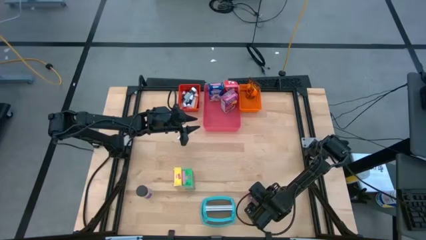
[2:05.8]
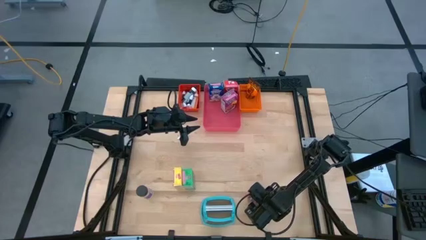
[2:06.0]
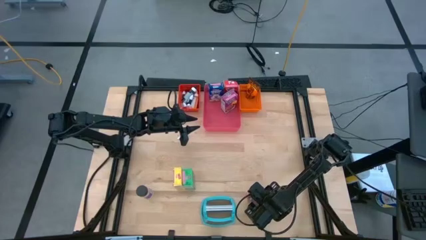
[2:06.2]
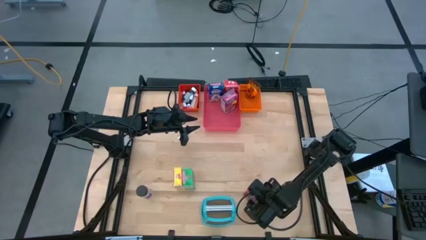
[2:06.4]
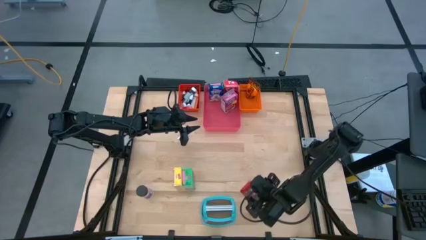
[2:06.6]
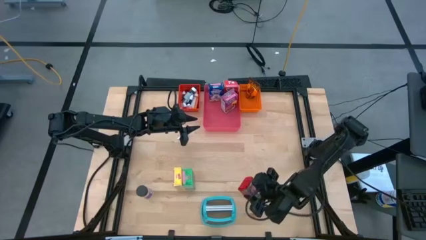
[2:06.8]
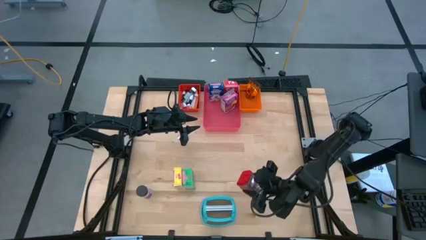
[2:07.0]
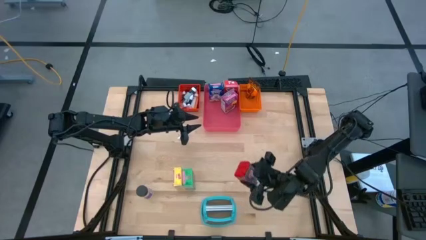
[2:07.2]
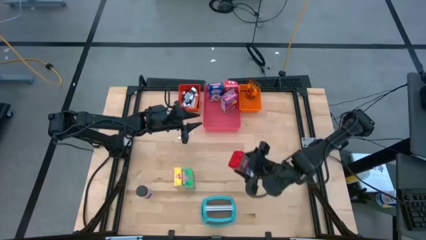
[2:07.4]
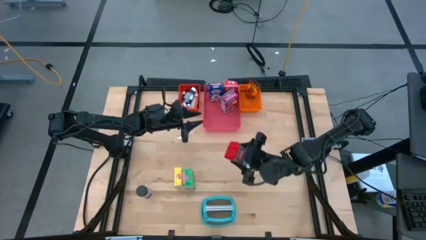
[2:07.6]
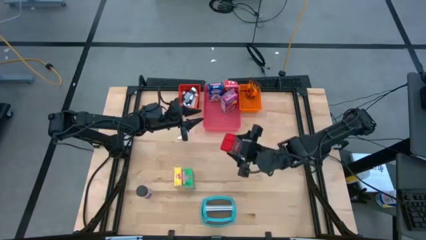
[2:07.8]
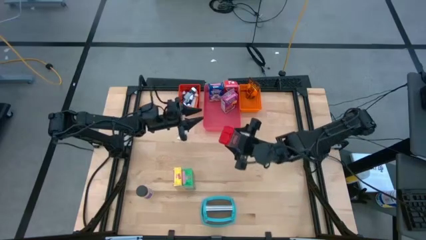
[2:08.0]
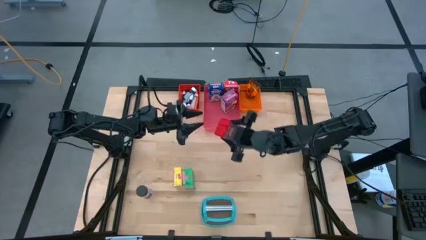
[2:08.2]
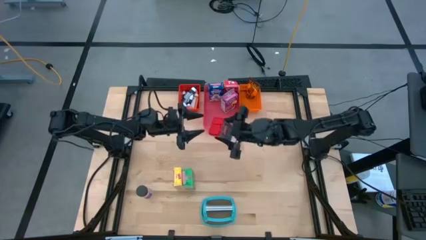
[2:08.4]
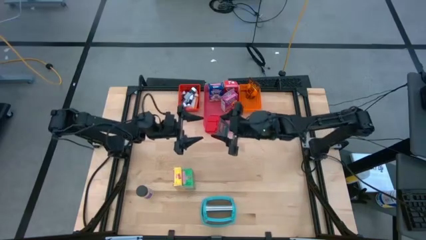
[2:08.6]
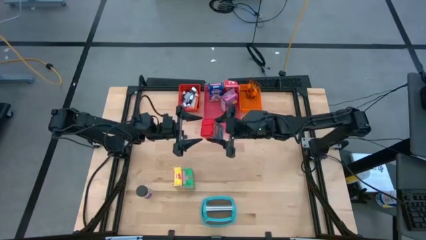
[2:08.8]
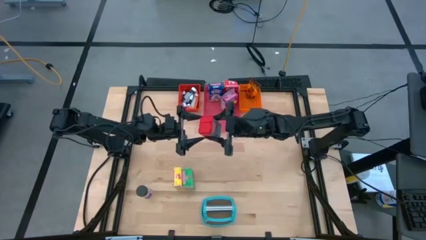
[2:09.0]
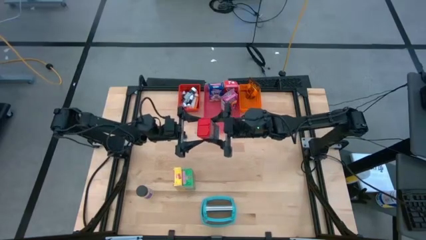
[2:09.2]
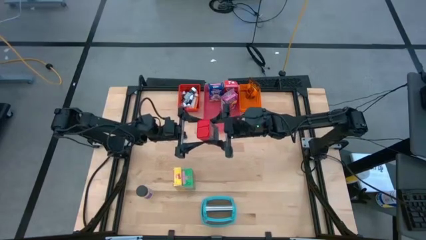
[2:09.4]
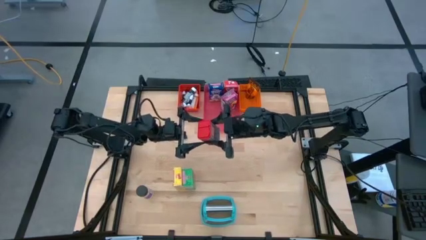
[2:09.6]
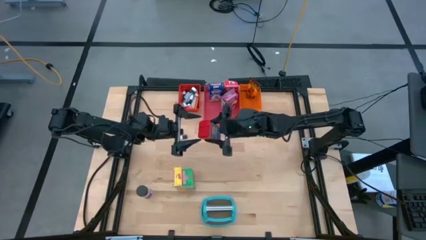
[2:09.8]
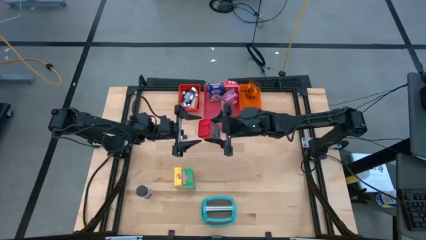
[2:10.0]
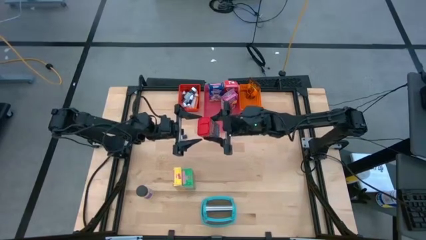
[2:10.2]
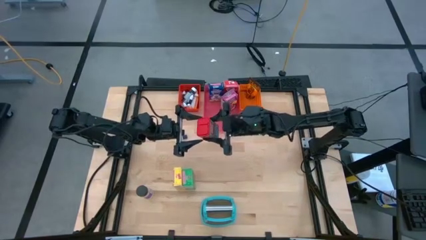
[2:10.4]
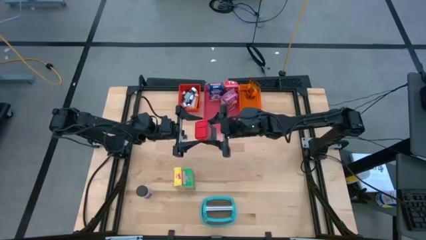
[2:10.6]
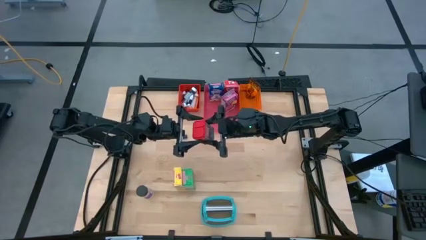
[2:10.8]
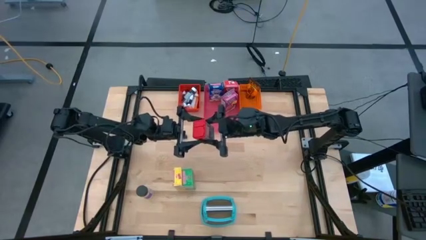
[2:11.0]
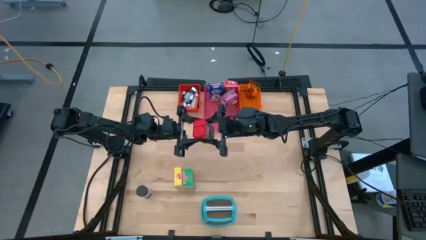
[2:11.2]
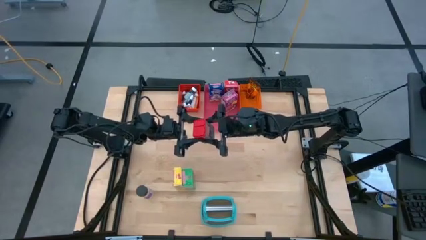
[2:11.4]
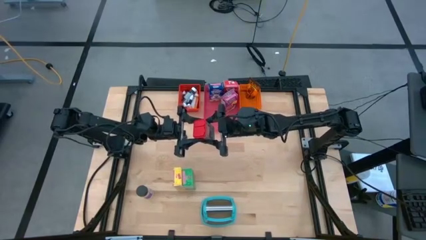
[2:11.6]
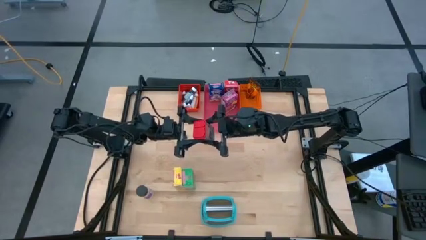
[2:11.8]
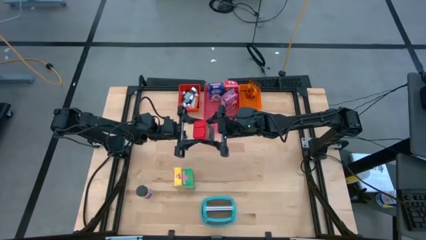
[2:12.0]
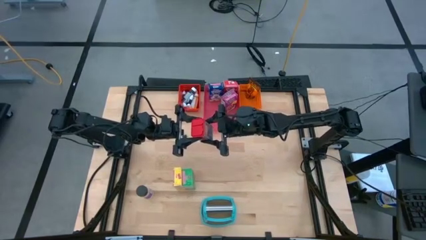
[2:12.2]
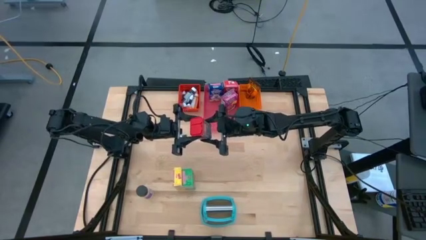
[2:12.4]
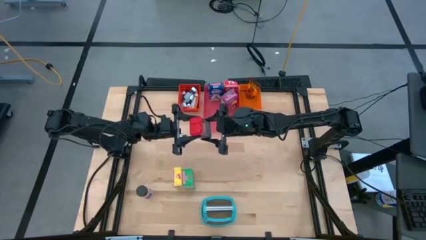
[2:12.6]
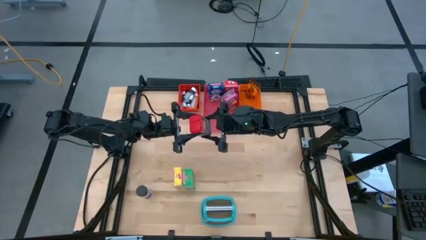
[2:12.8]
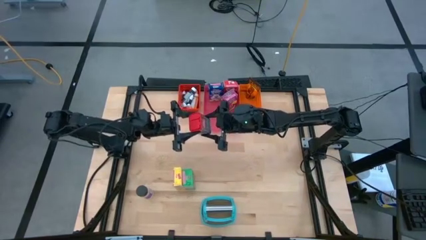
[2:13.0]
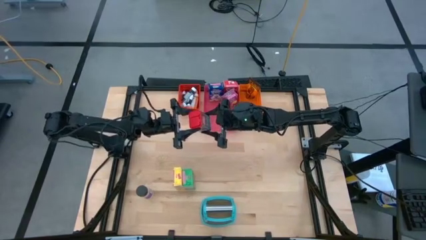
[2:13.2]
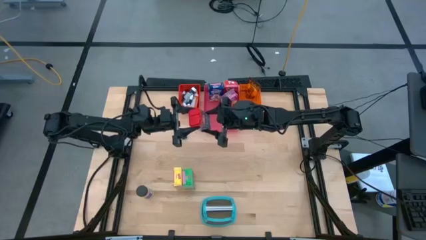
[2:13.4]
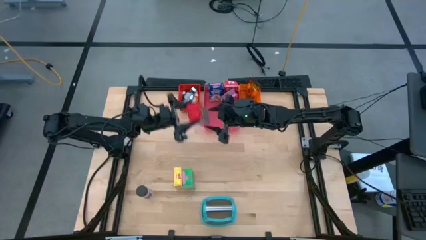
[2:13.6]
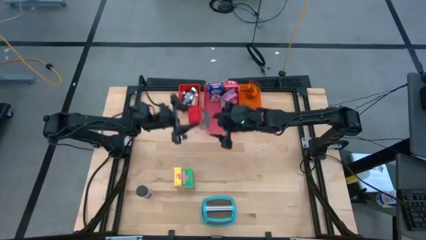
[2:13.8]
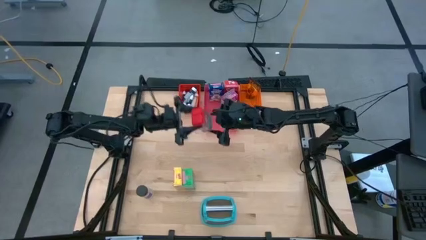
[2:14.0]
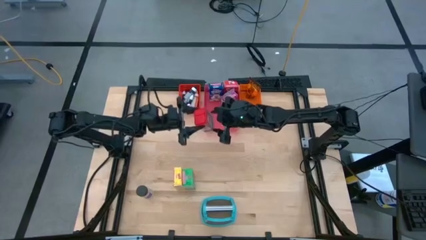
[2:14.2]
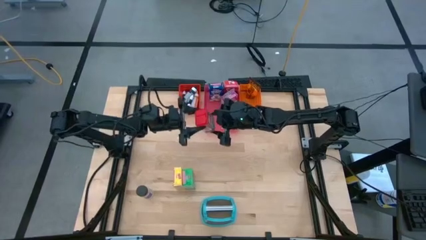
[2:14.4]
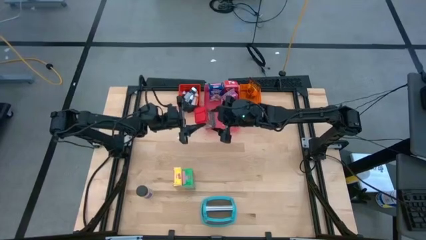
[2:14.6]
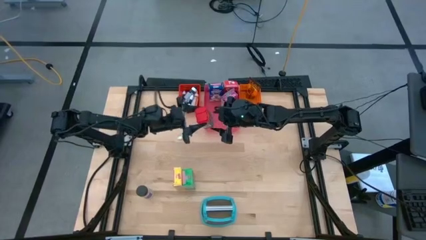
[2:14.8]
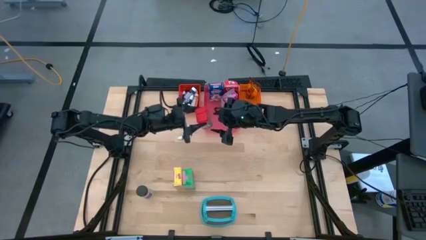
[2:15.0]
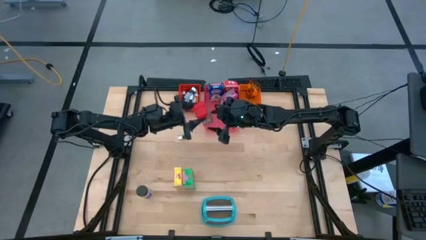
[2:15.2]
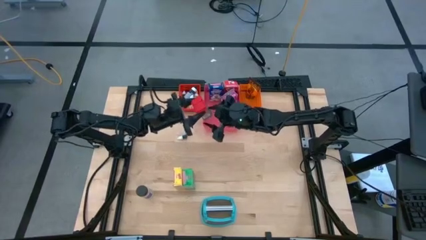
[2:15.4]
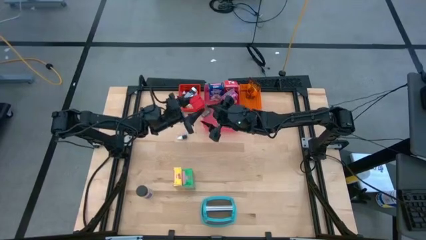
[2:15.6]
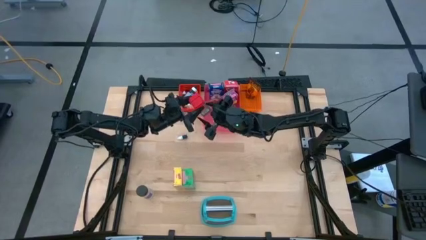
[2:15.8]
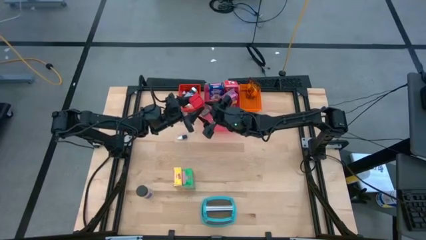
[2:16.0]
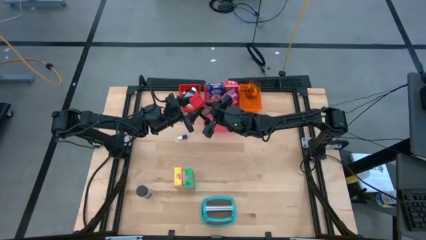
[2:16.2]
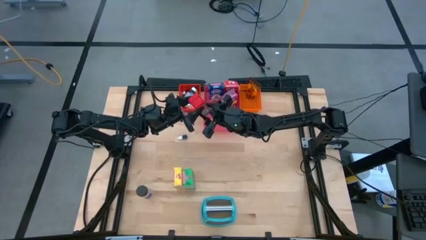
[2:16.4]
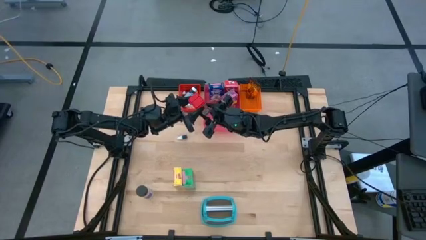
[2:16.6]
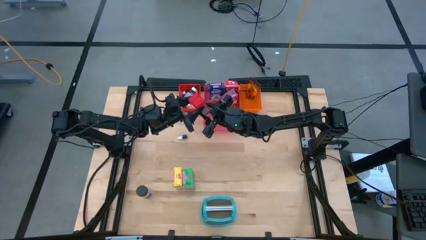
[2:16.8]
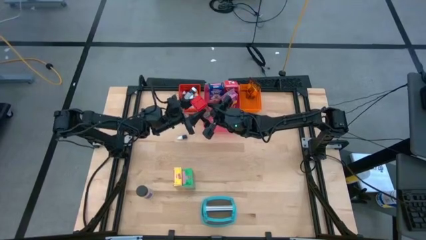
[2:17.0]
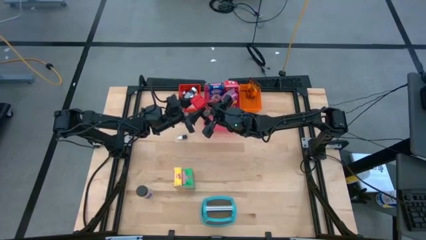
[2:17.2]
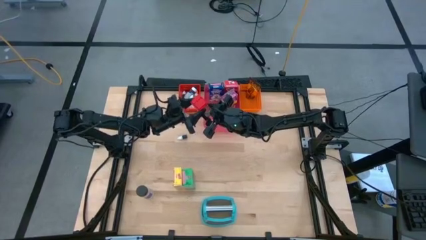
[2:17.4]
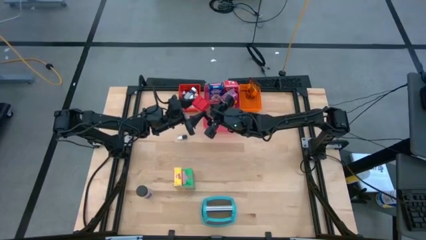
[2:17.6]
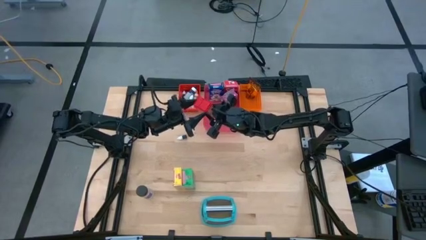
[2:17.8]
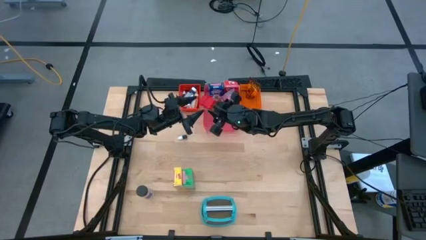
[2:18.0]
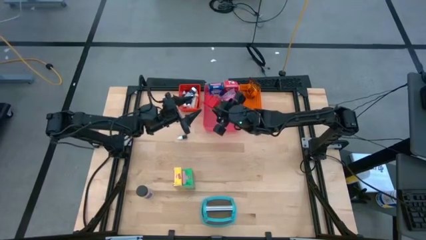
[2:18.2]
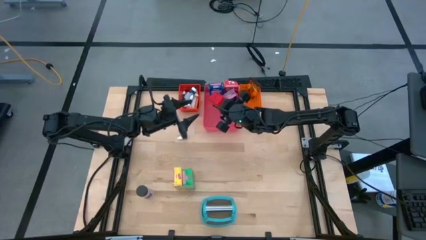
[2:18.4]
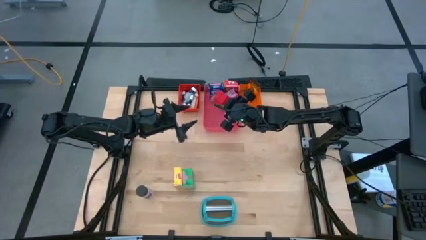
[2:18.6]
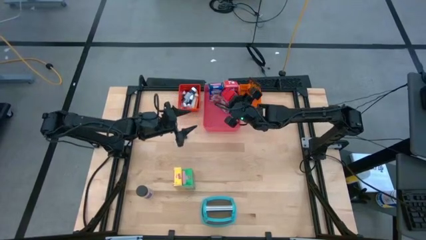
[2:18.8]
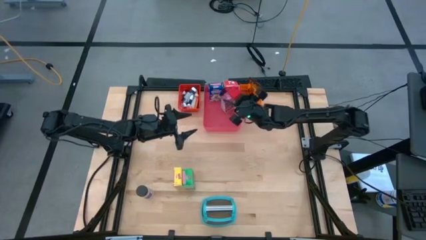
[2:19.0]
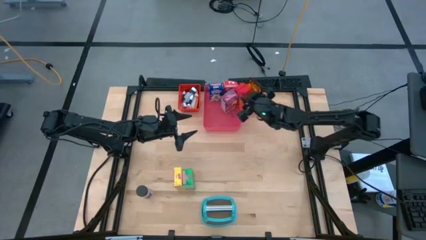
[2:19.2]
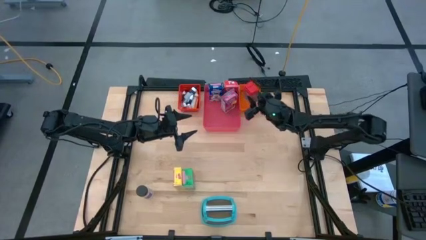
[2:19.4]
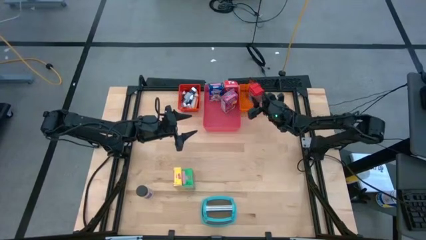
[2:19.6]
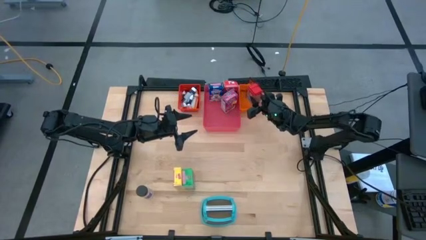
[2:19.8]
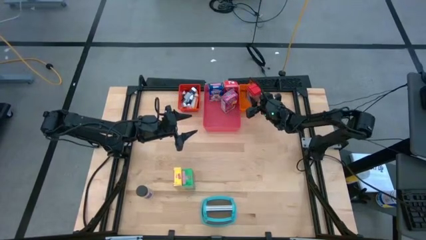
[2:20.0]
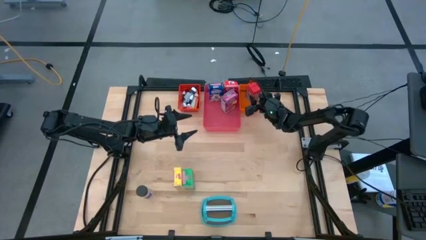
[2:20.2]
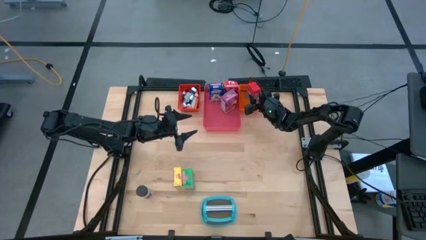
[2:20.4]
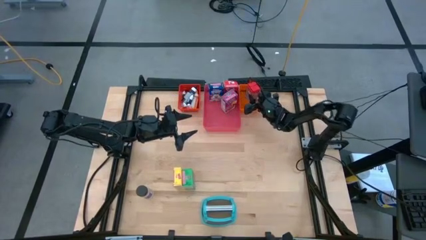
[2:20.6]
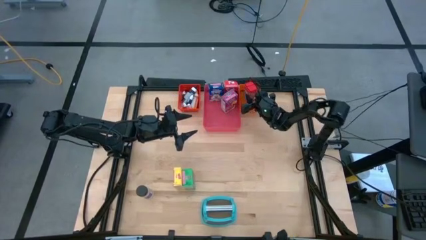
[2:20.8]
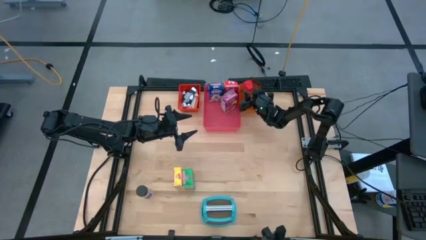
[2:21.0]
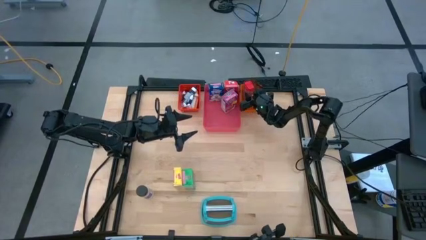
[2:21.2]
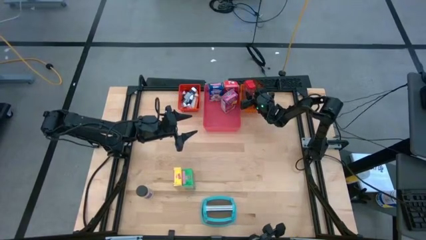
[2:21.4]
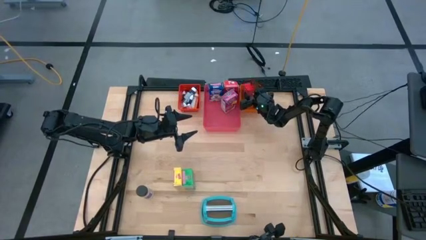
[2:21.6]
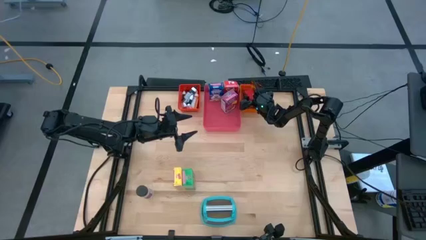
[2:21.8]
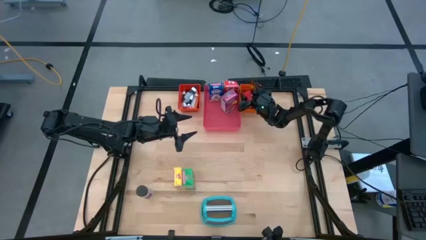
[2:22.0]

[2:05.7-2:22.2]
Task: Pick & Place Kitchen Items
Put the red seasoning can into the orange bin
